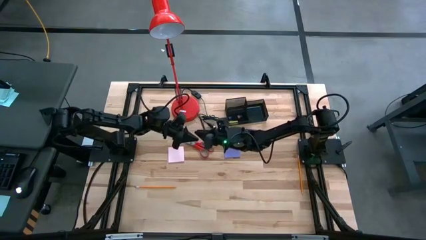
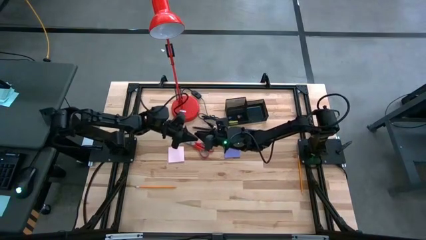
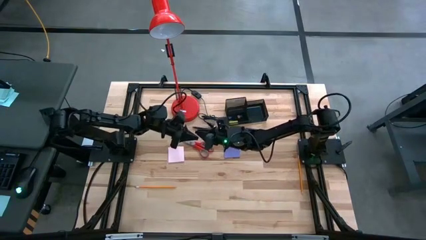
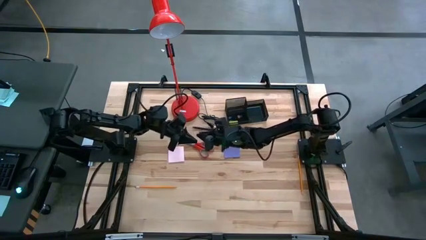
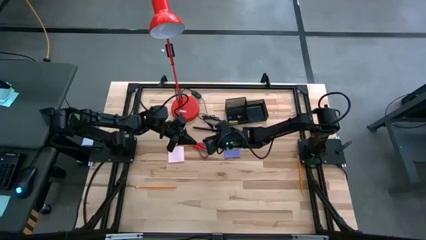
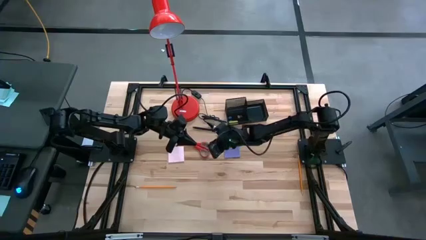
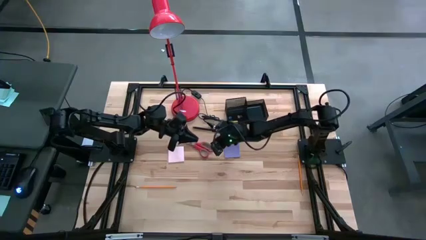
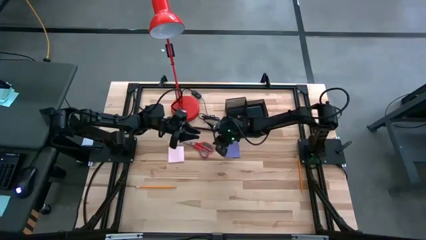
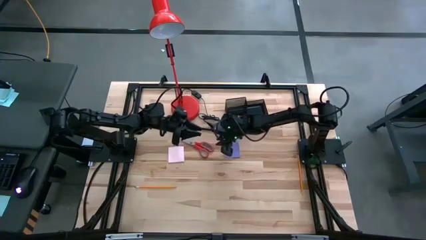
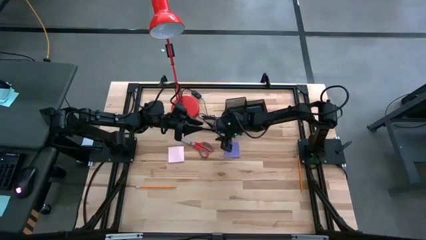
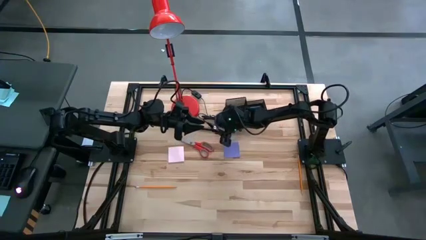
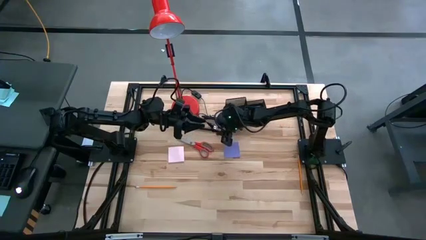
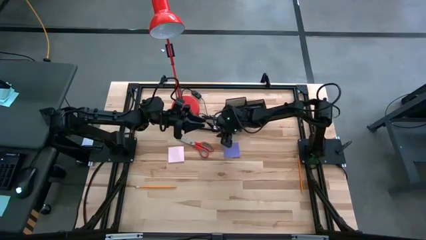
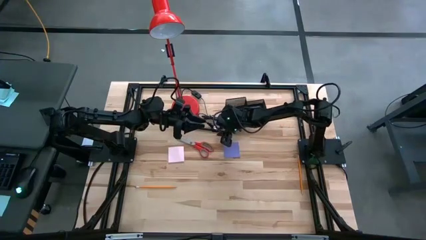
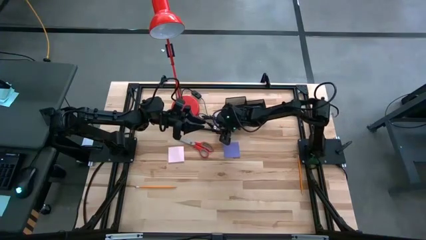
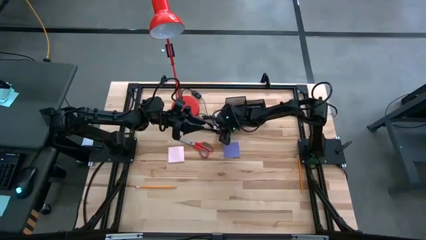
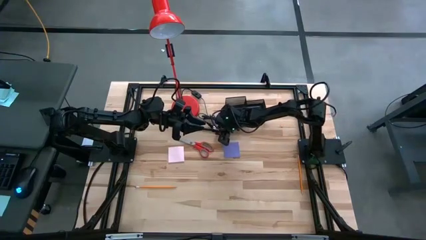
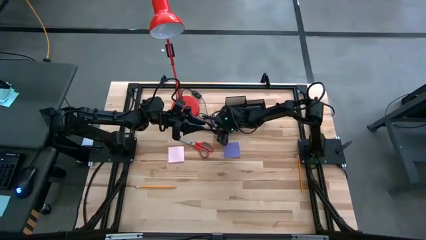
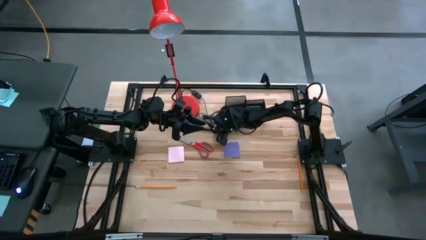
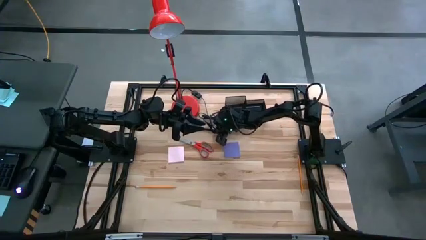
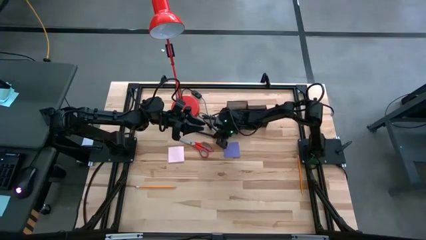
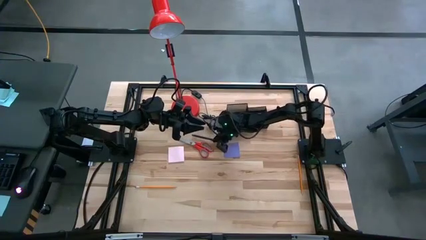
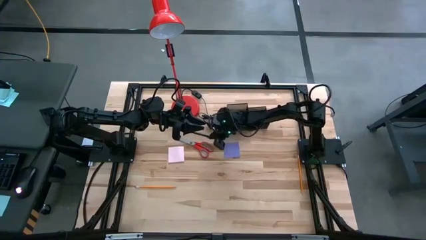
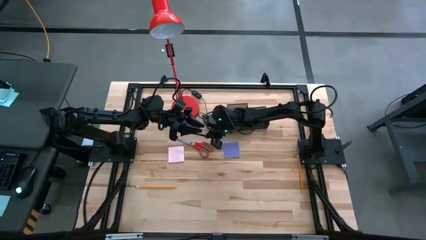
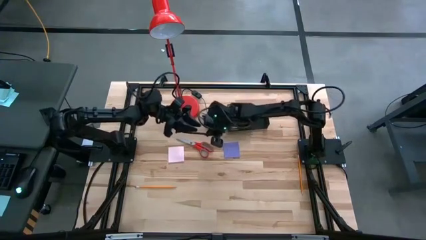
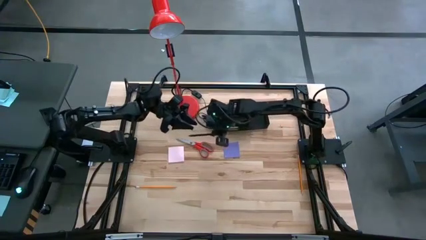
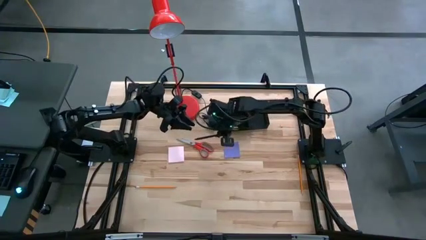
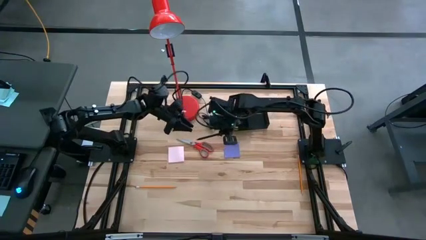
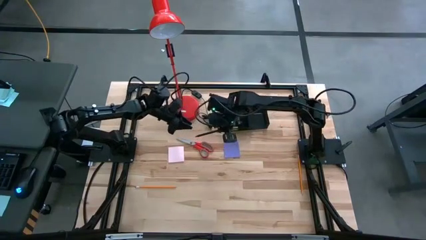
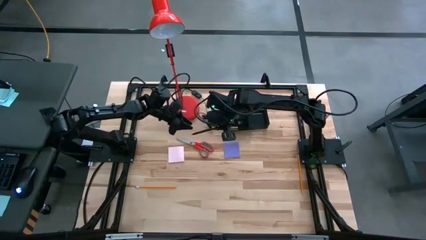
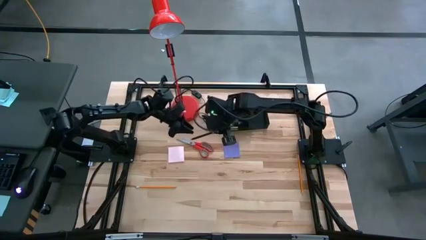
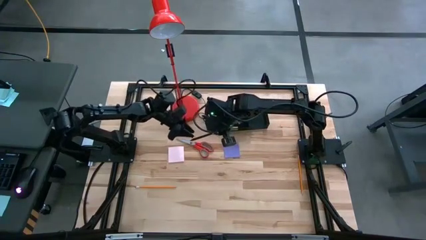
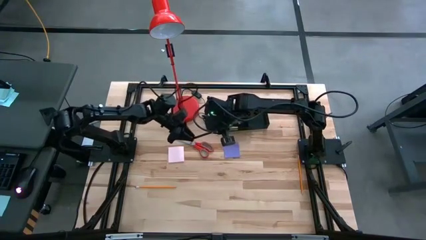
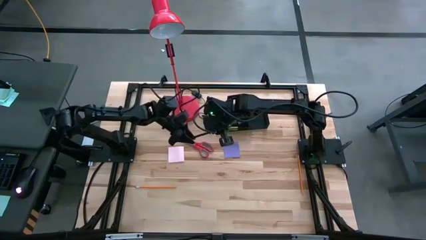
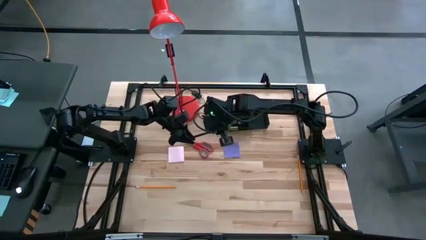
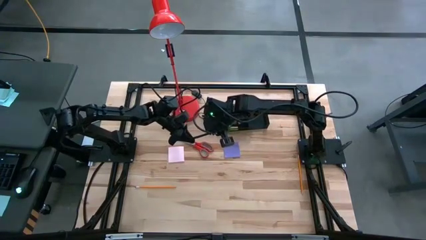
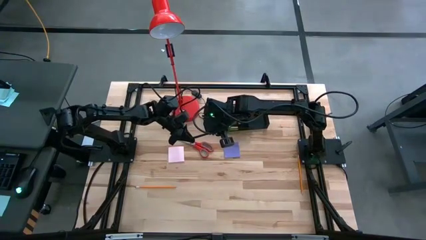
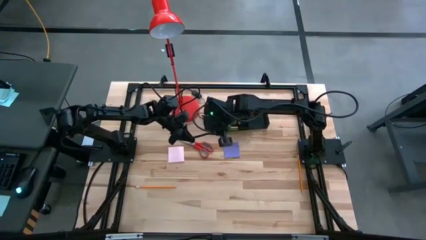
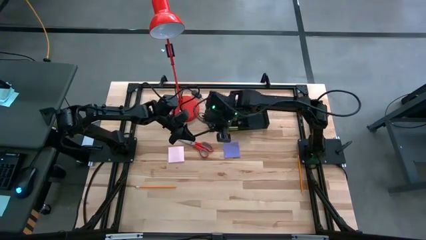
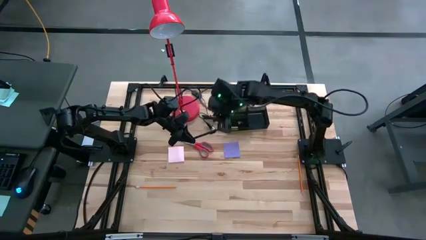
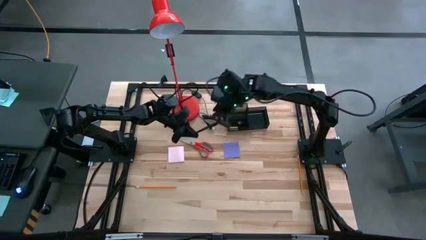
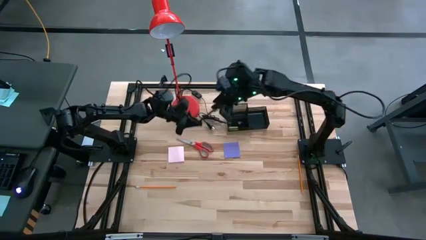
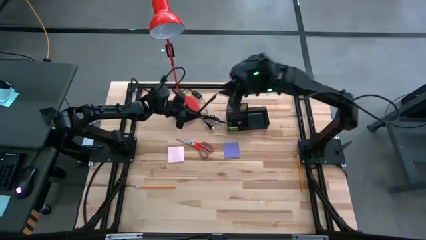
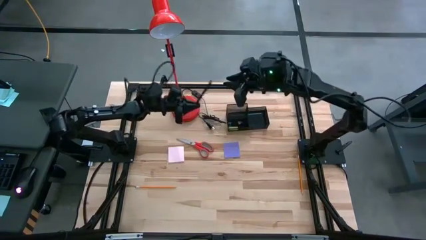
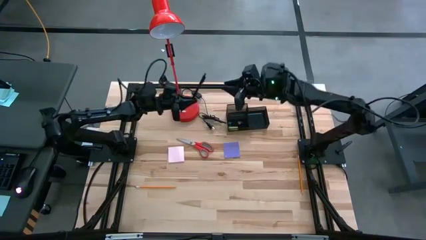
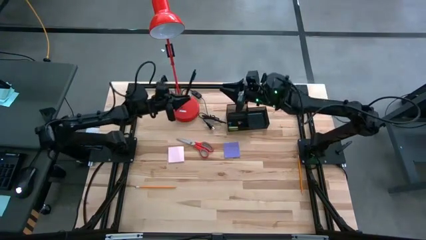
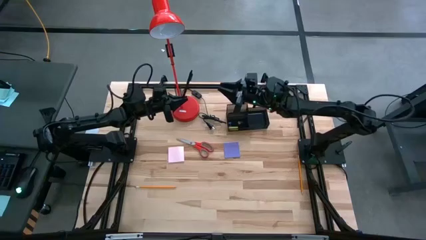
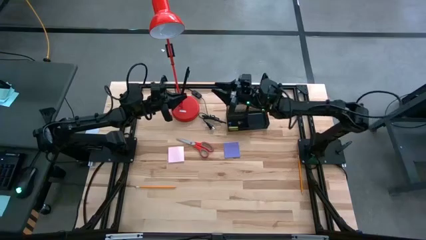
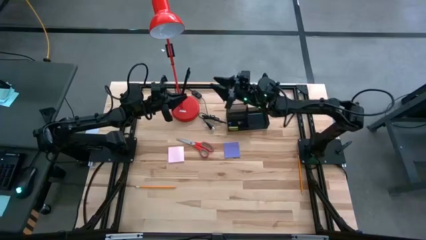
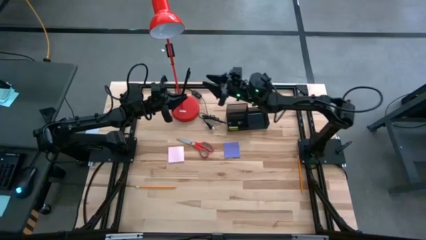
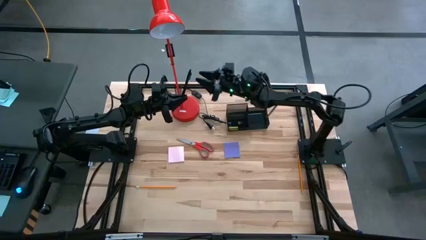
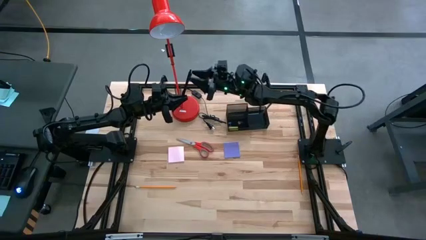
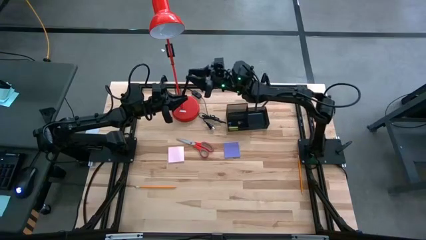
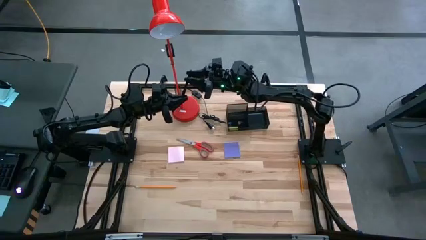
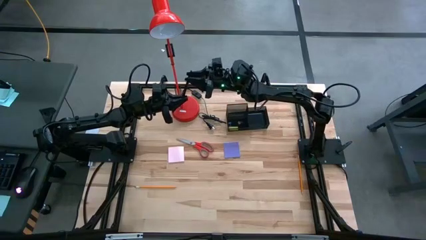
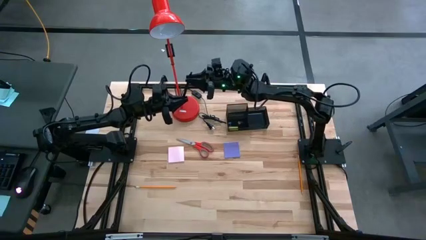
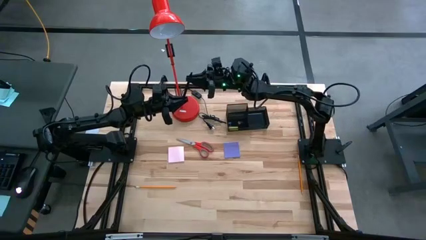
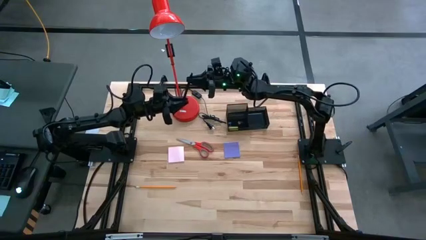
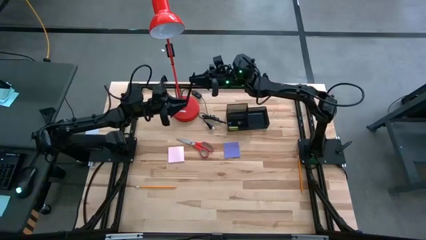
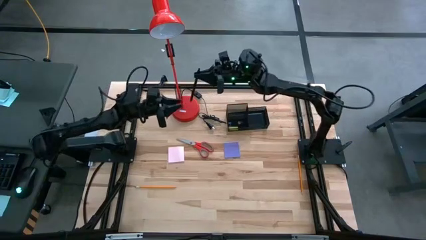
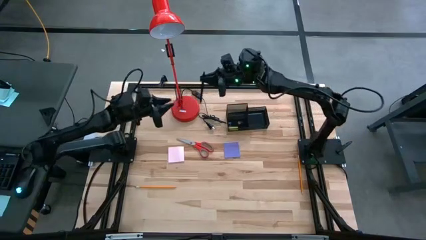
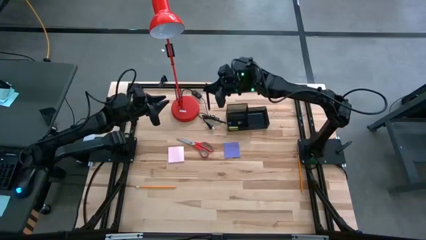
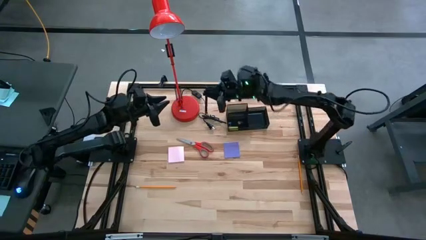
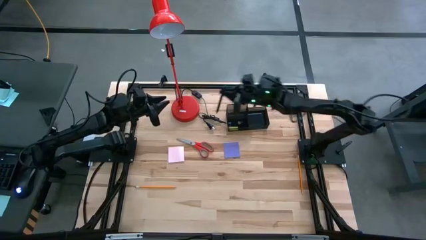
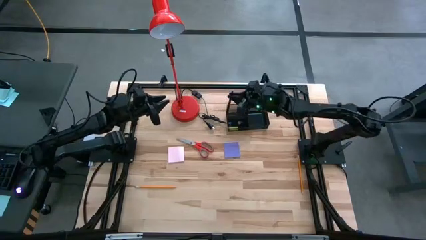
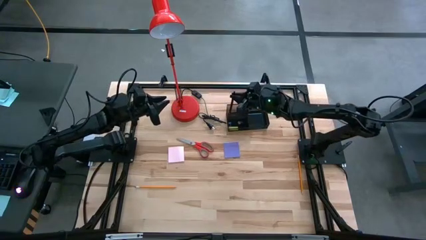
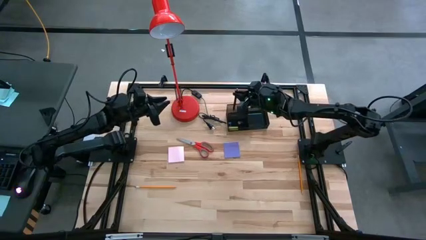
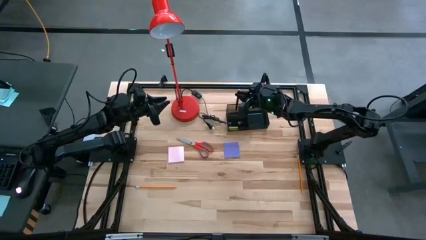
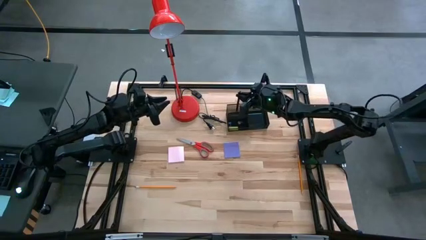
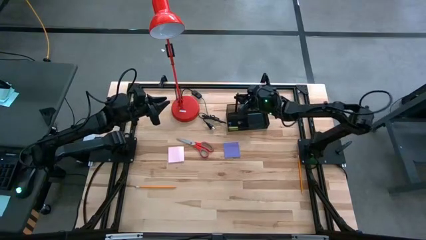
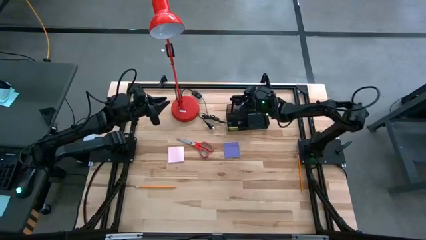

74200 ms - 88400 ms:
Task: Pick and place office supplies into organizer
Put the black pen into the black desk organizer
